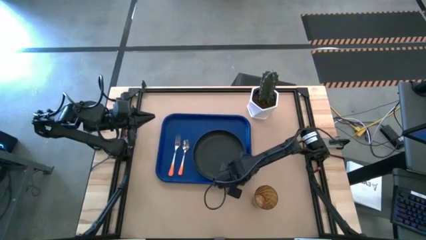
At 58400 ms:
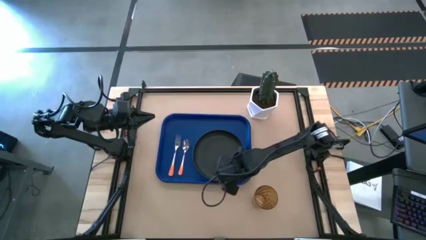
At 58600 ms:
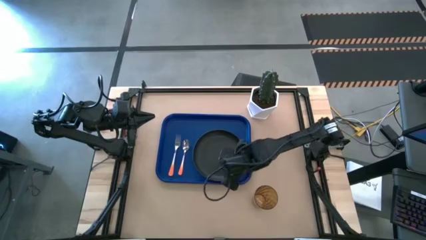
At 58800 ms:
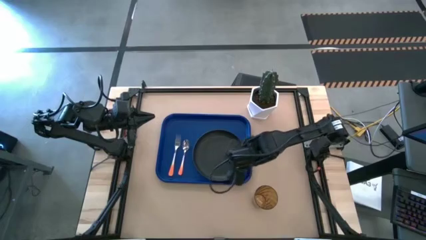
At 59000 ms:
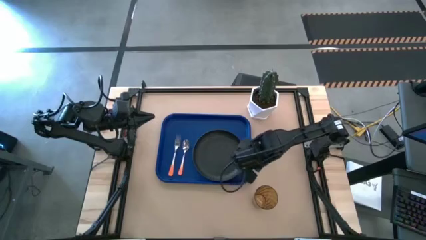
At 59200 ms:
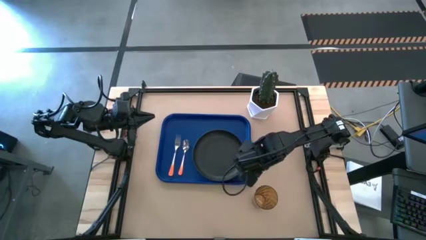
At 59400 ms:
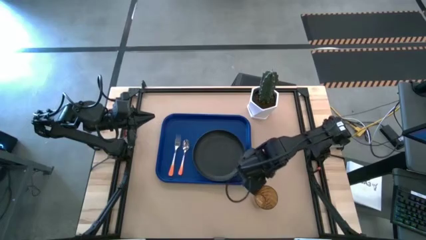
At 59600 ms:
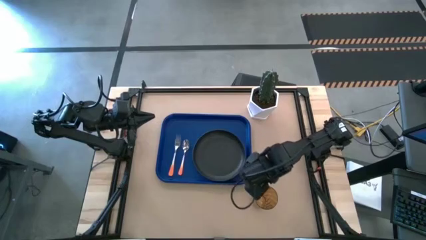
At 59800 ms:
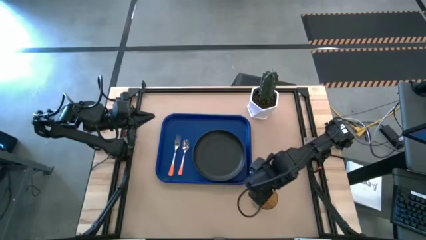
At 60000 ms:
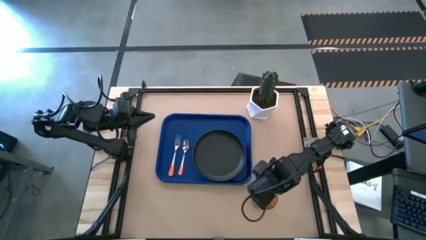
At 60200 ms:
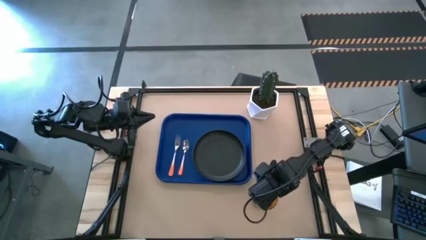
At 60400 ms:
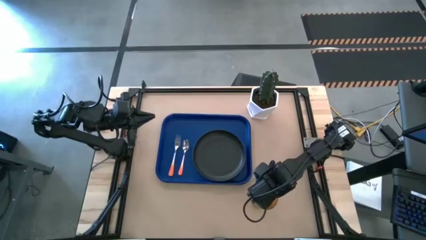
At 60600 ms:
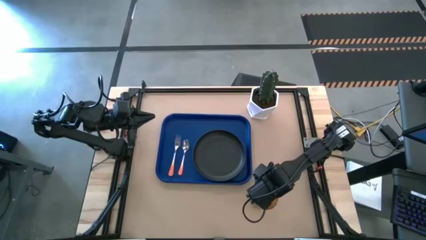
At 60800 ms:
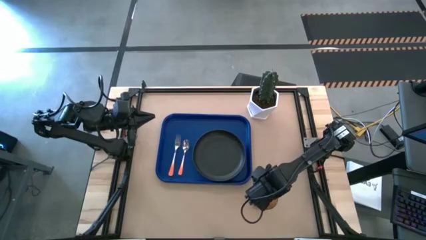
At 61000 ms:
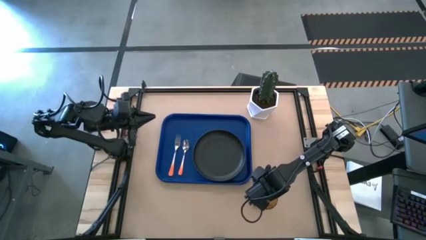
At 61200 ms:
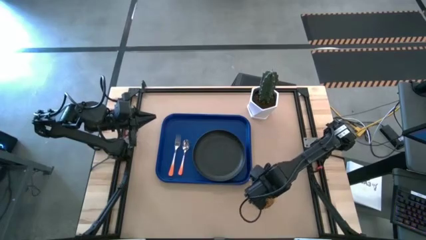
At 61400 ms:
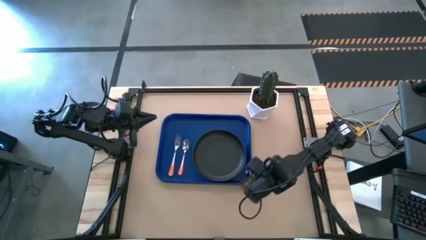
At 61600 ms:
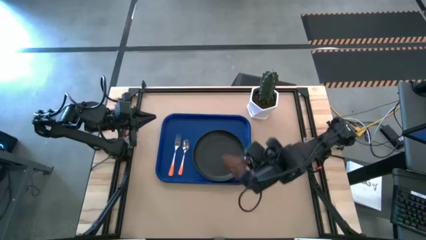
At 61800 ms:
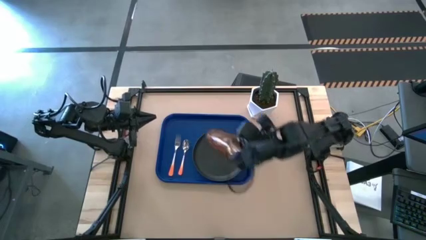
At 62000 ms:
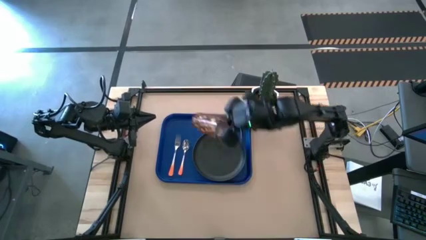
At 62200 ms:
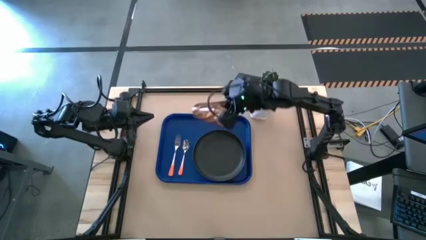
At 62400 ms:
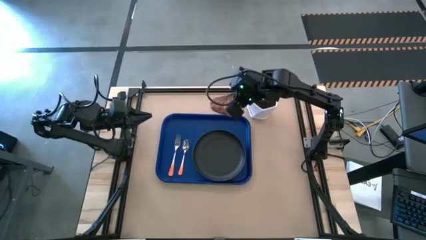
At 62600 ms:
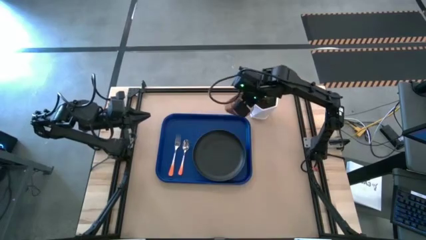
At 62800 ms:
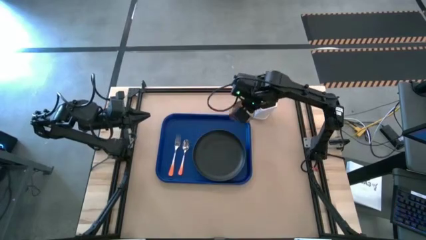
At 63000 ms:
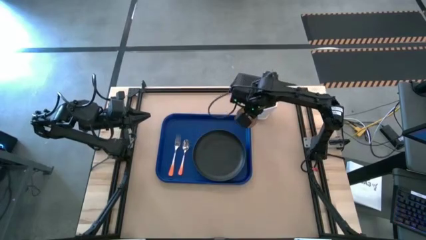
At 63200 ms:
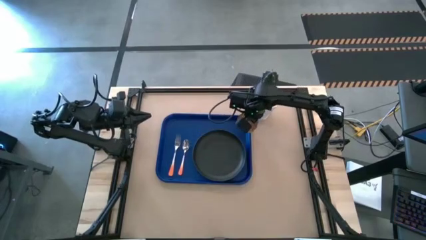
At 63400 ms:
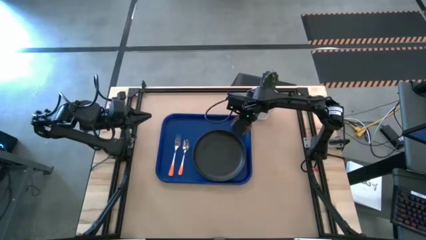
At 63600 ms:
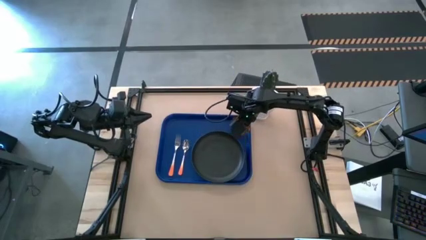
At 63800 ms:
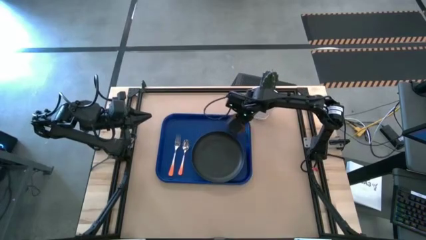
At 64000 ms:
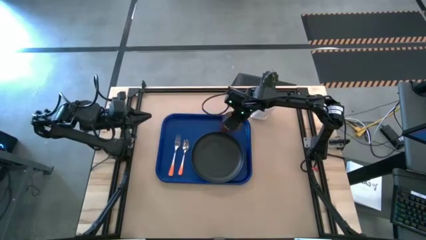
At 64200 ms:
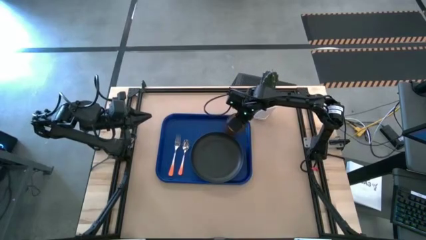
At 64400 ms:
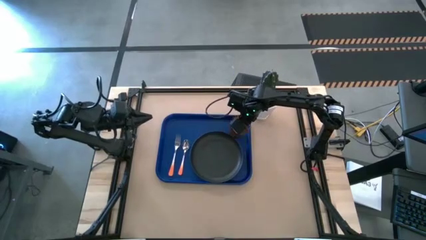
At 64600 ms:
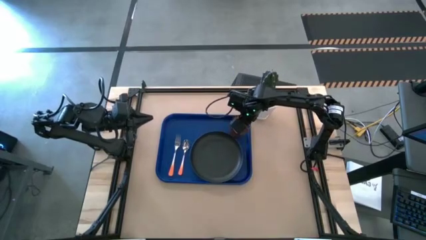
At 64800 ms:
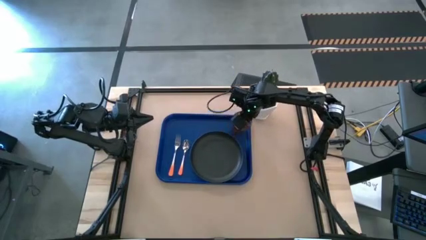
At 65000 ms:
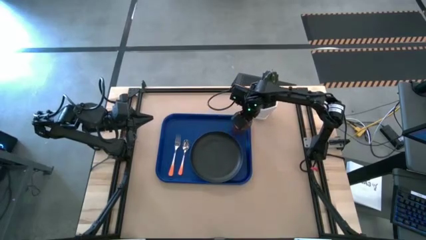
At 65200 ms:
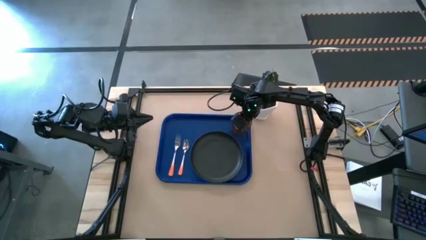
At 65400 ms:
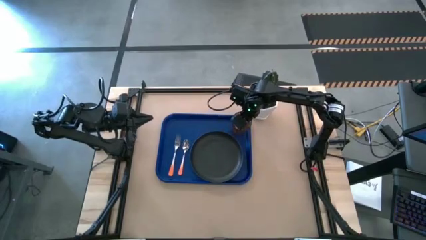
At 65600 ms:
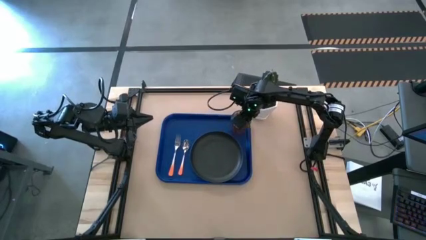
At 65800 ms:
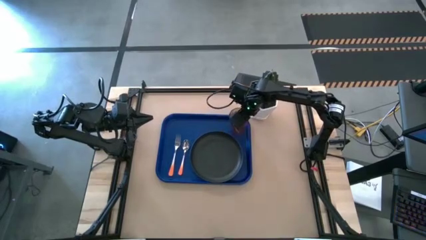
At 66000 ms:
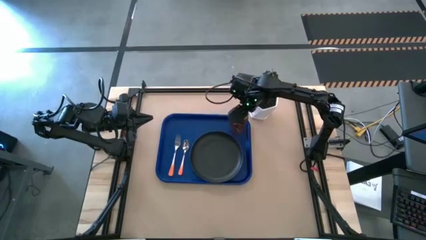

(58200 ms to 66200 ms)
Task: Pick and place plate/cup/fork/spoon on tray
Put the brown cup on the blue tray on the top right of the black plate

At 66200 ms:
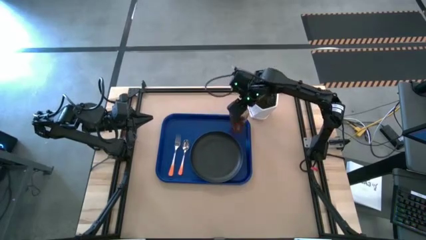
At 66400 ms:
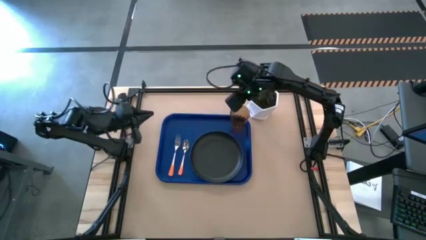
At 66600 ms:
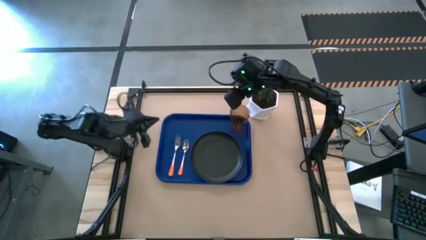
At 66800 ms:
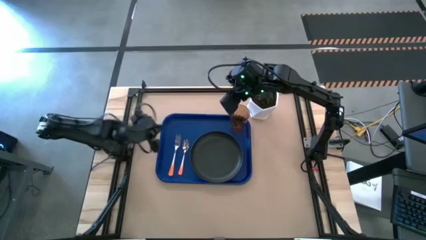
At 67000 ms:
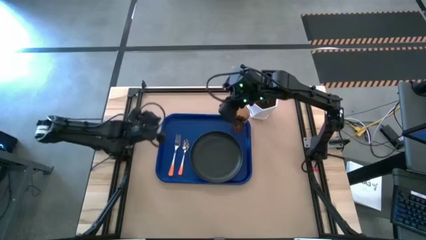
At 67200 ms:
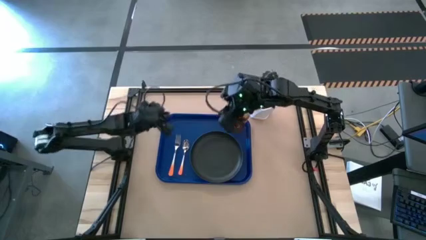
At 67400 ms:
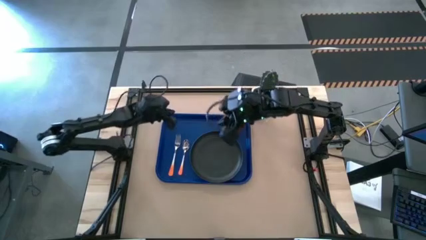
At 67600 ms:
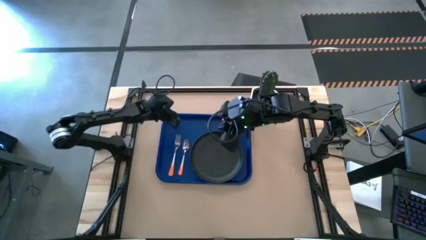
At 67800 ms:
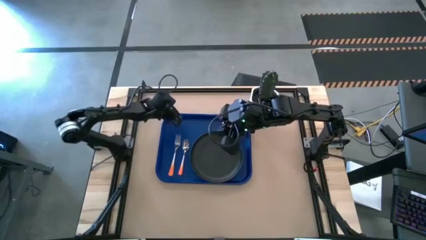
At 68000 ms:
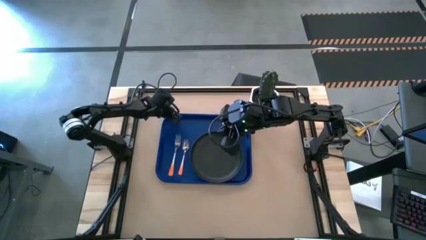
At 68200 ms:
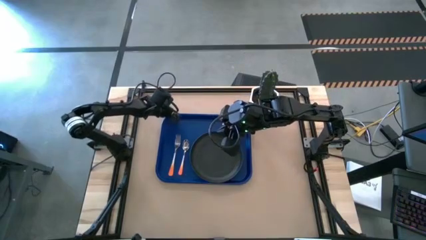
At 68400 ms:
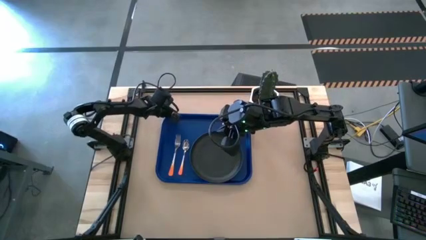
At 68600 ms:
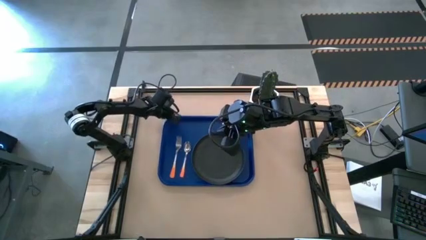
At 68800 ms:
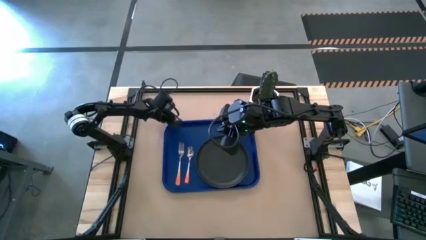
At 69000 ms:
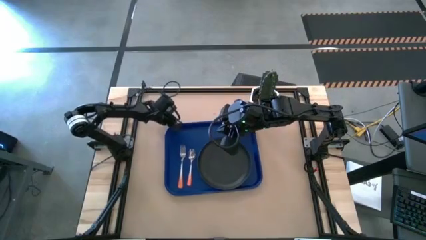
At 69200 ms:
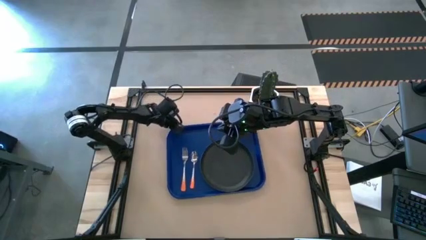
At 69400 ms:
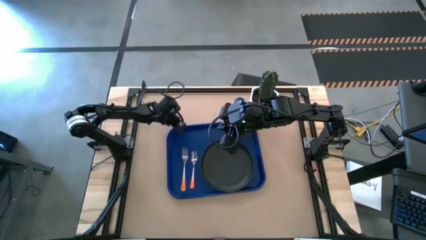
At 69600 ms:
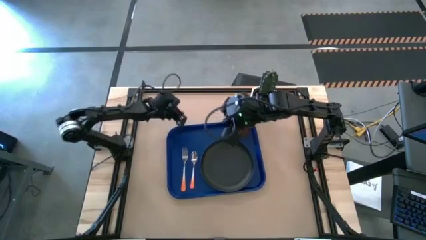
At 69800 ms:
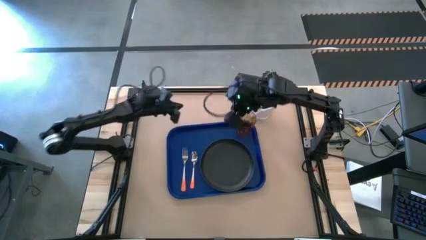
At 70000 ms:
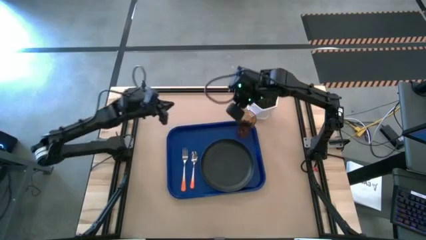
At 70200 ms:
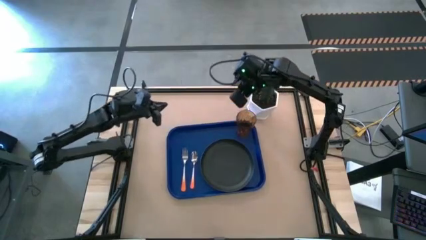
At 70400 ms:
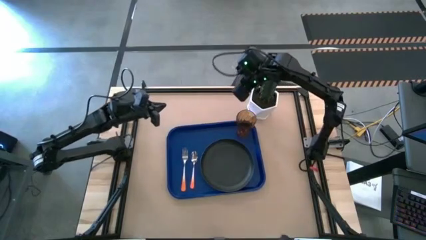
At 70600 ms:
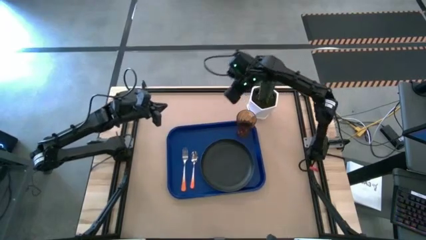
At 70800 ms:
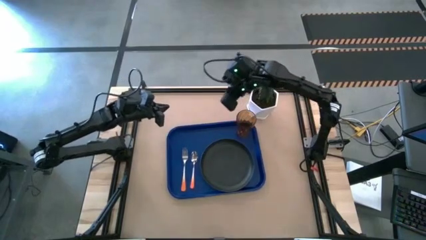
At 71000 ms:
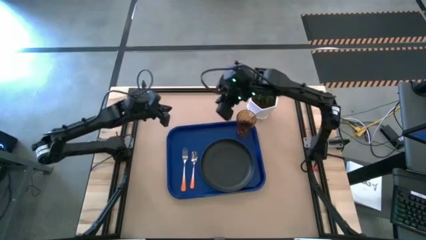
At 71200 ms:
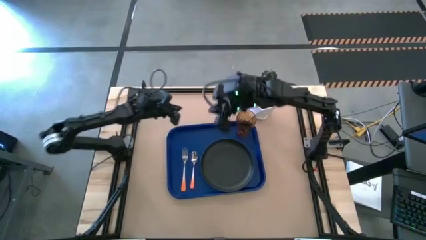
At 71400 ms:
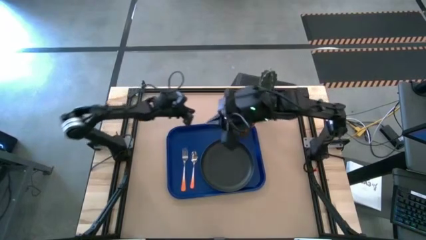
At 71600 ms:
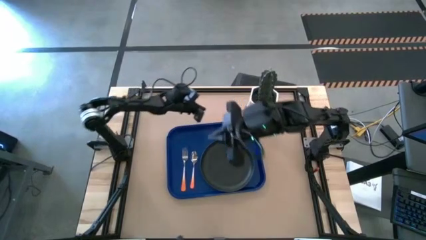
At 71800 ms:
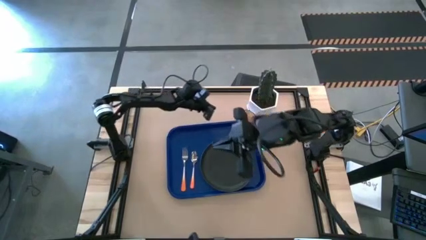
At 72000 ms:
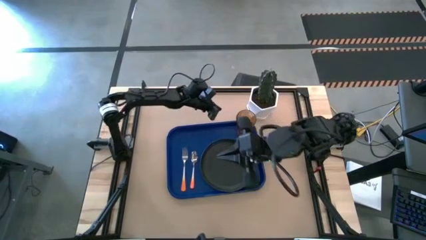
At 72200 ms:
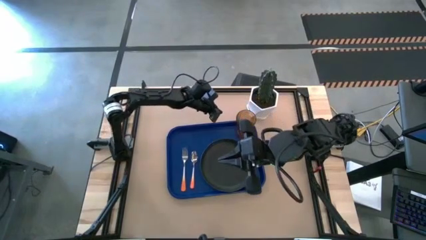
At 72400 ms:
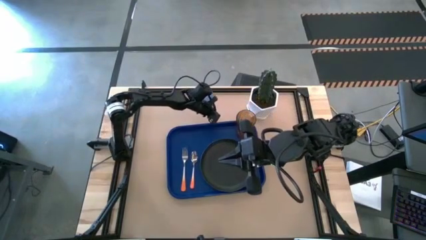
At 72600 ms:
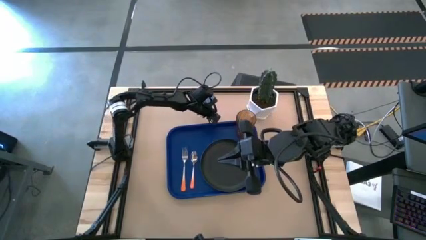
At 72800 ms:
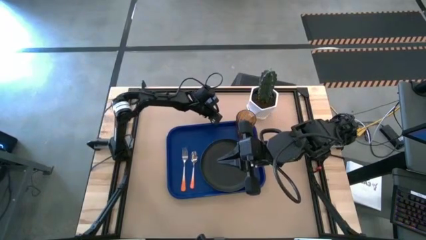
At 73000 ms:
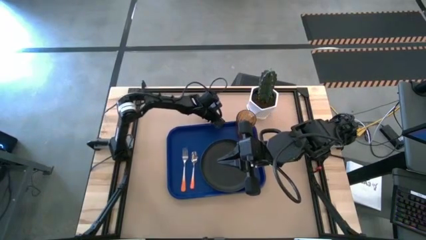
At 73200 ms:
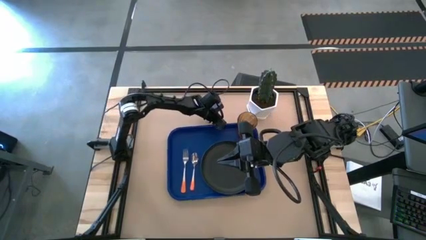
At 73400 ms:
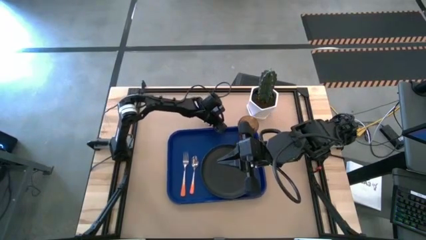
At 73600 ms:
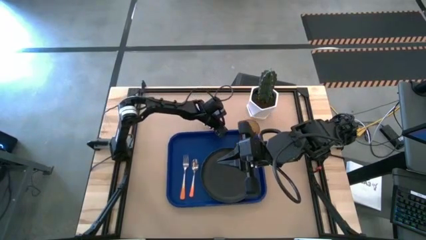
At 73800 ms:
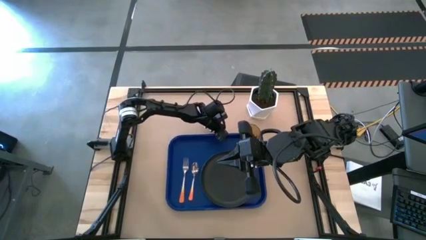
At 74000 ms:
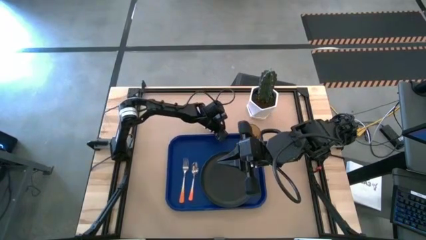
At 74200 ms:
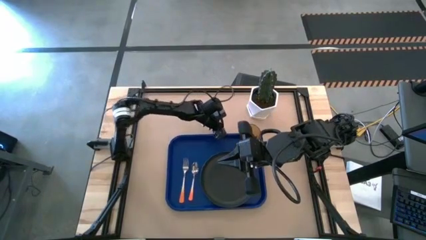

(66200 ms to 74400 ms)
Adjust the blue tray

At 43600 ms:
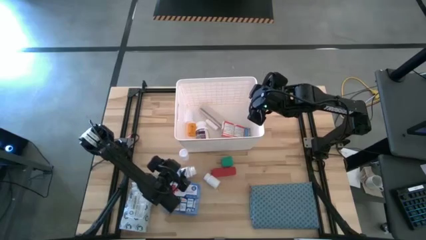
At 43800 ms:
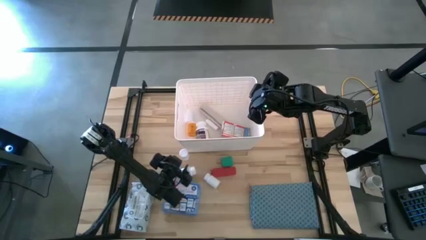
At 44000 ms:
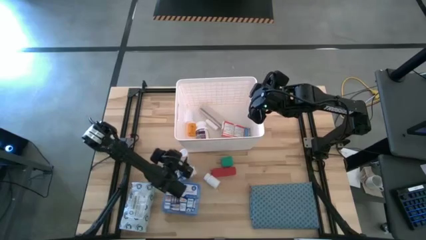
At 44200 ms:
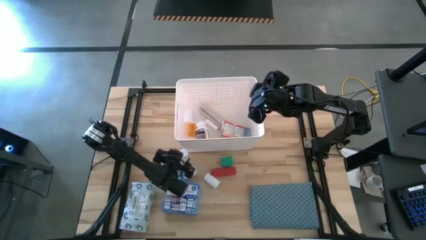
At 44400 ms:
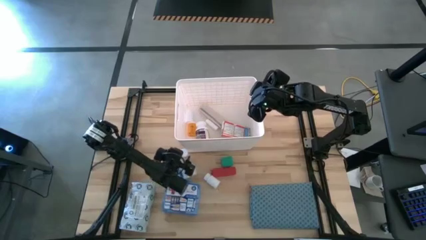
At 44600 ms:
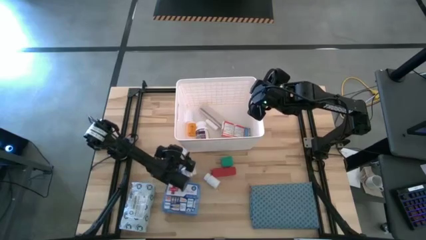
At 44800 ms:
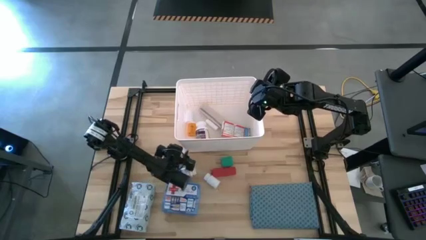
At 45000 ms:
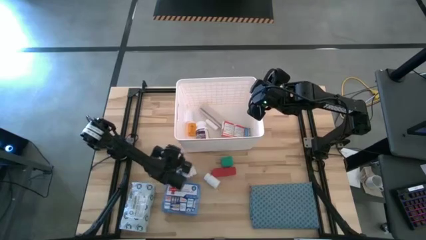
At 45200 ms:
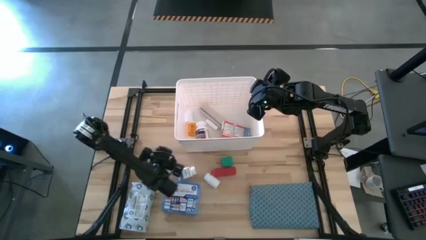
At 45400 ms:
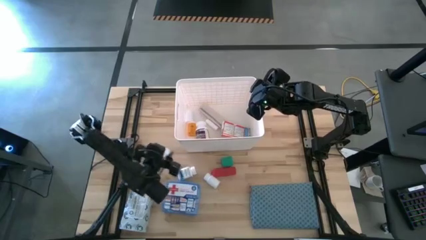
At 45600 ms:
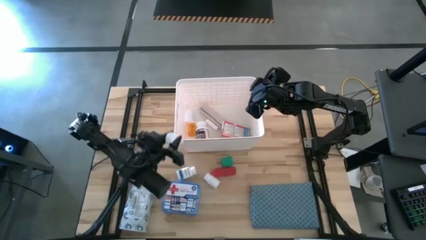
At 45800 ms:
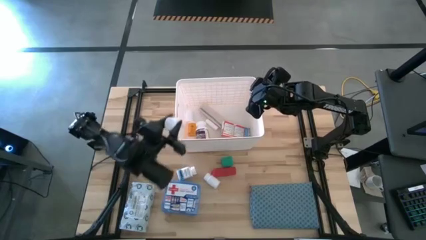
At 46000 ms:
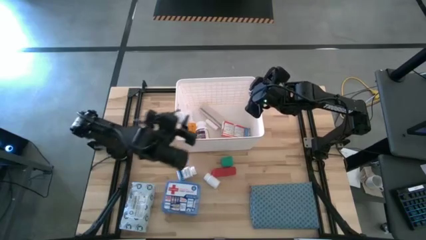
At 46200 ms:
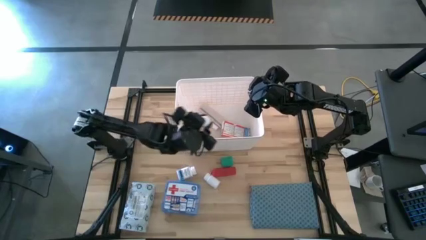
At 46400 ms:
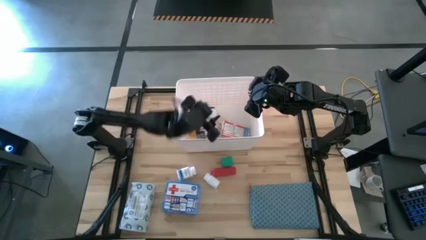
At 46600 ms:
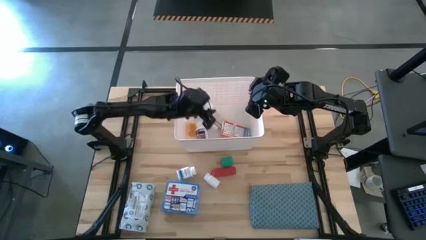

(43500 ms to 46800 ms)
Task: Pick & place medical supplies in basket/bin
Put the white medicine bottle into the white bin
